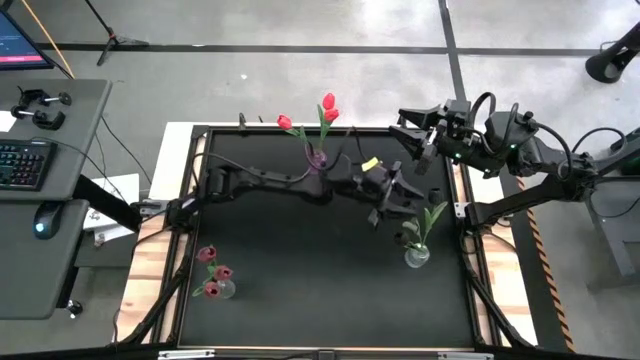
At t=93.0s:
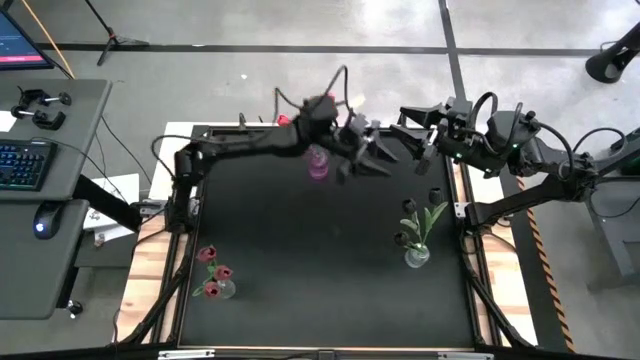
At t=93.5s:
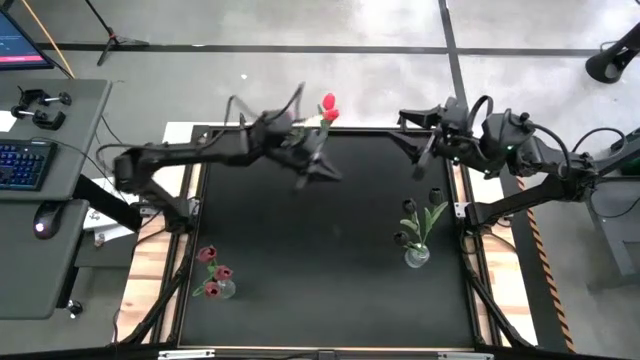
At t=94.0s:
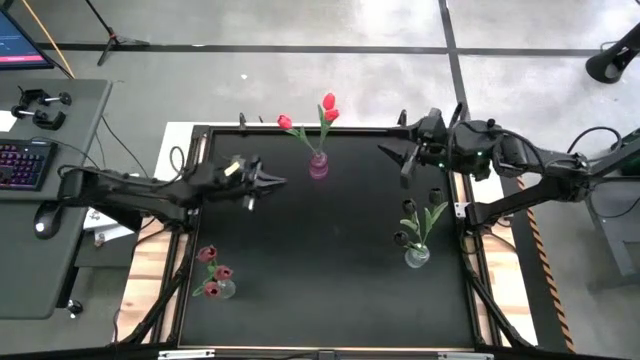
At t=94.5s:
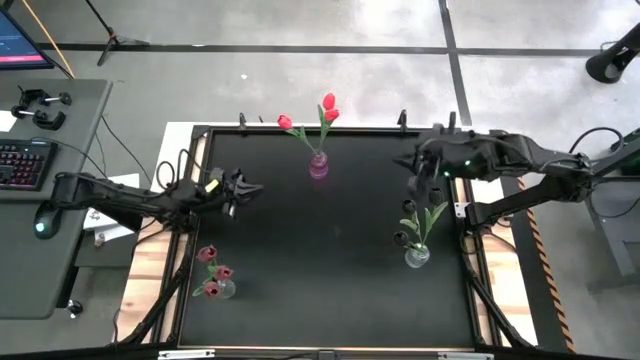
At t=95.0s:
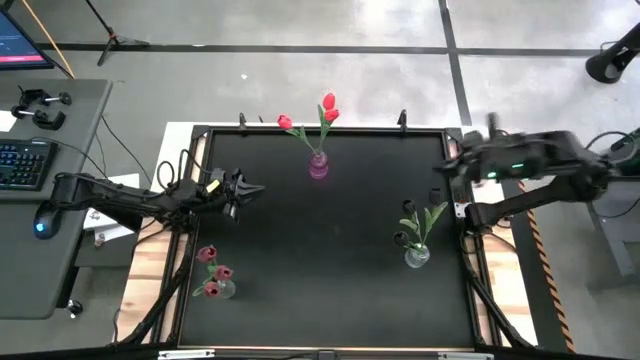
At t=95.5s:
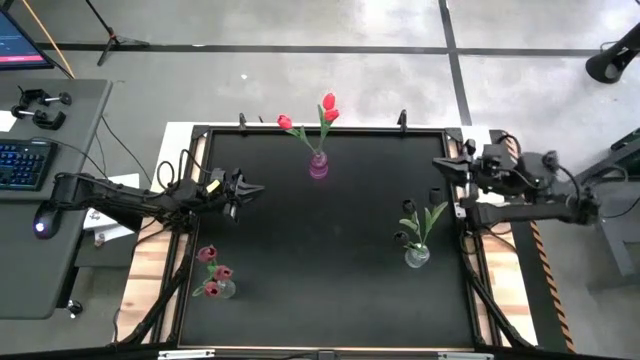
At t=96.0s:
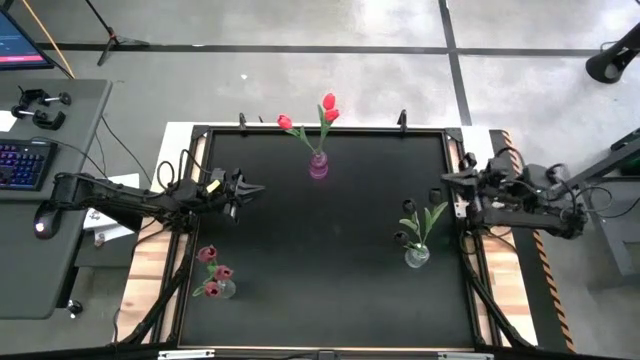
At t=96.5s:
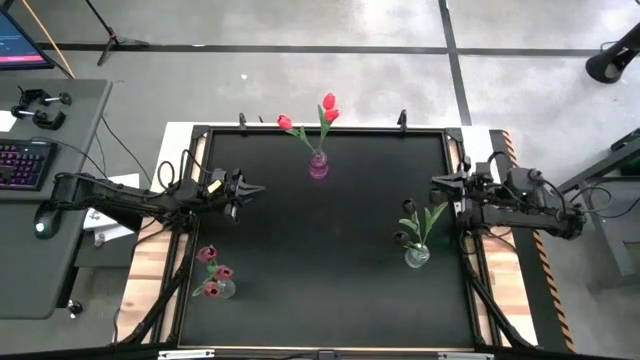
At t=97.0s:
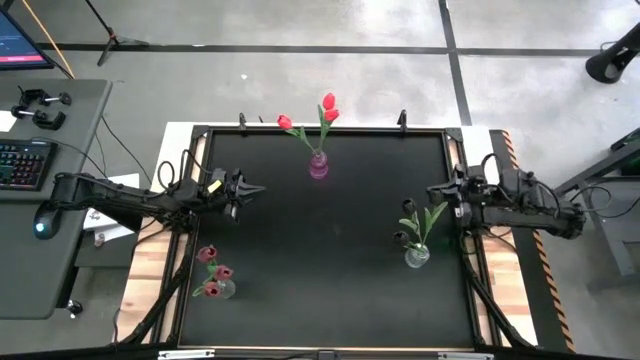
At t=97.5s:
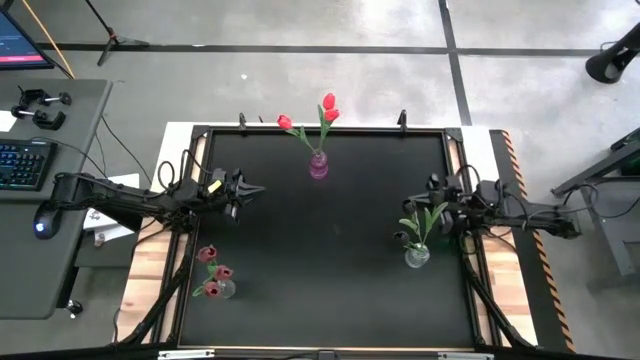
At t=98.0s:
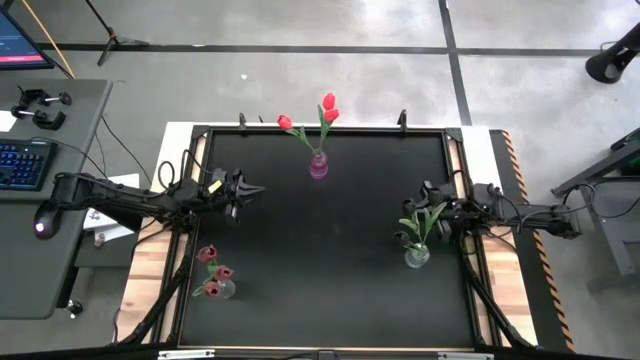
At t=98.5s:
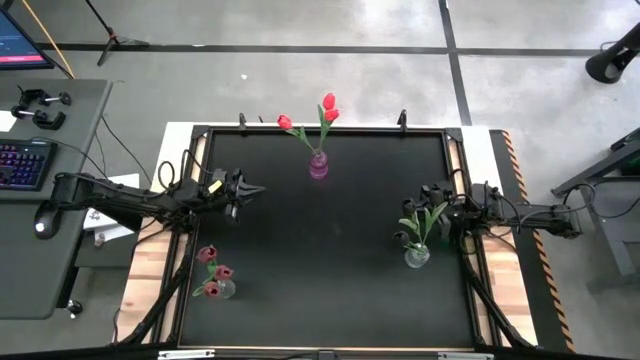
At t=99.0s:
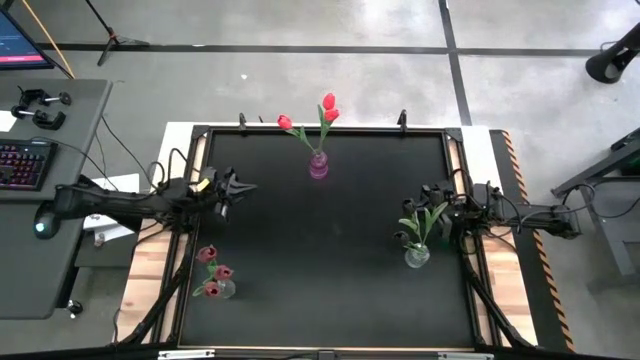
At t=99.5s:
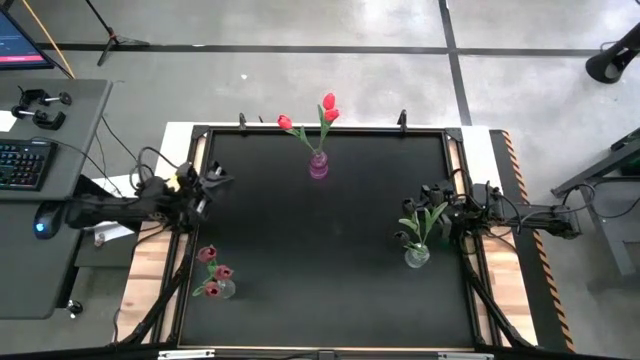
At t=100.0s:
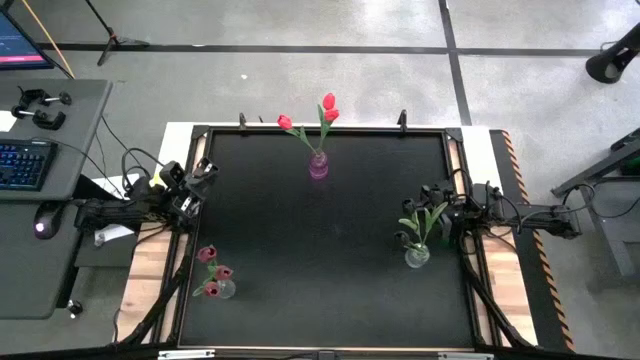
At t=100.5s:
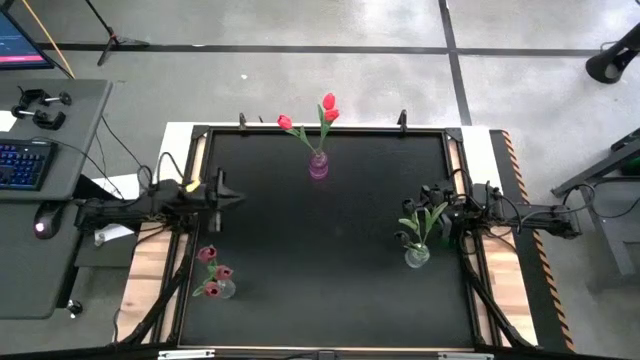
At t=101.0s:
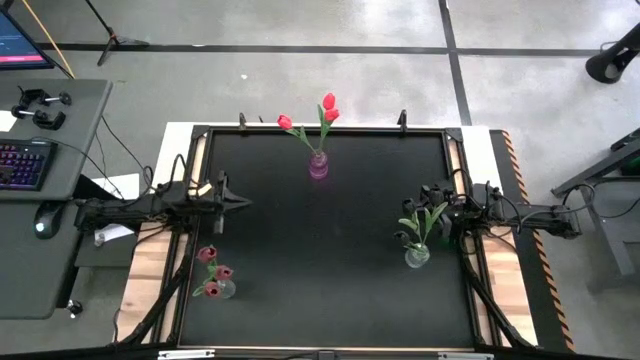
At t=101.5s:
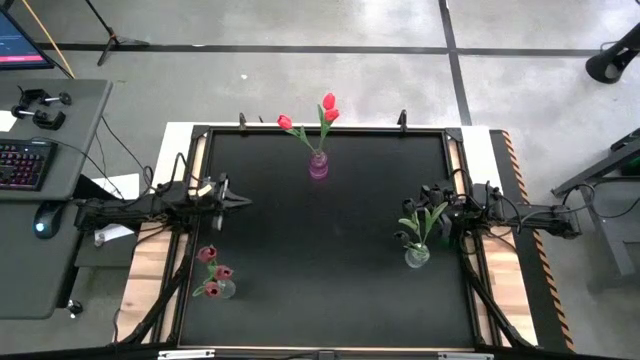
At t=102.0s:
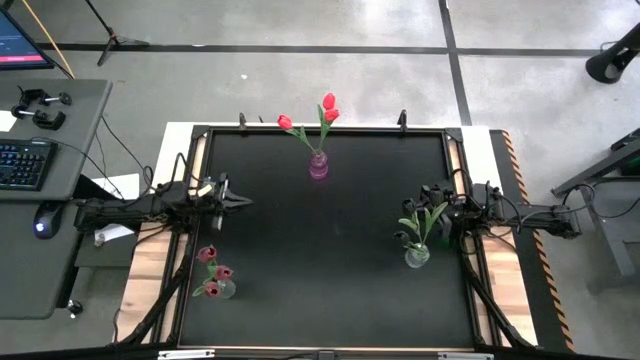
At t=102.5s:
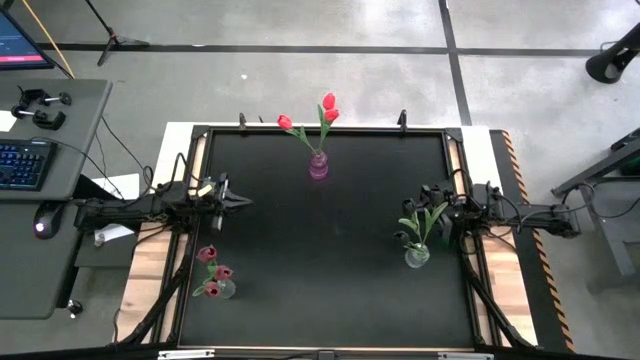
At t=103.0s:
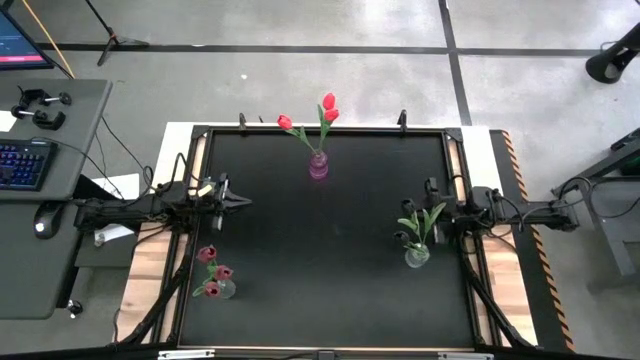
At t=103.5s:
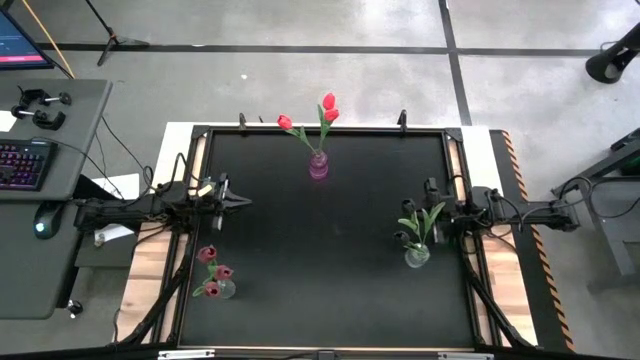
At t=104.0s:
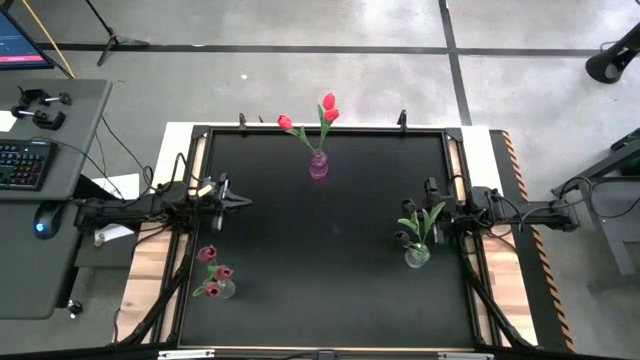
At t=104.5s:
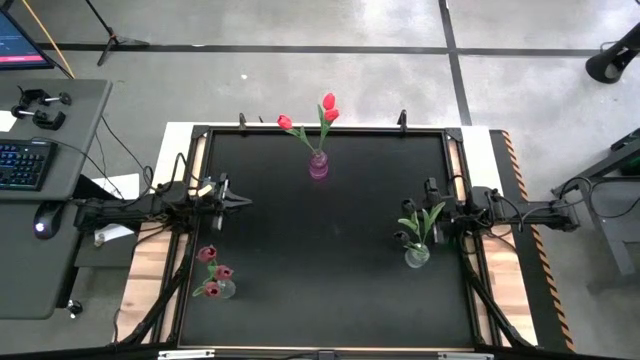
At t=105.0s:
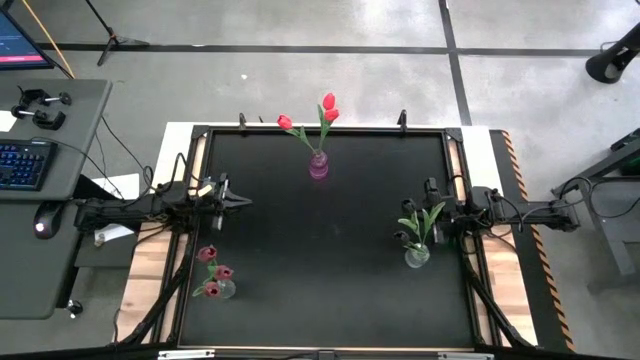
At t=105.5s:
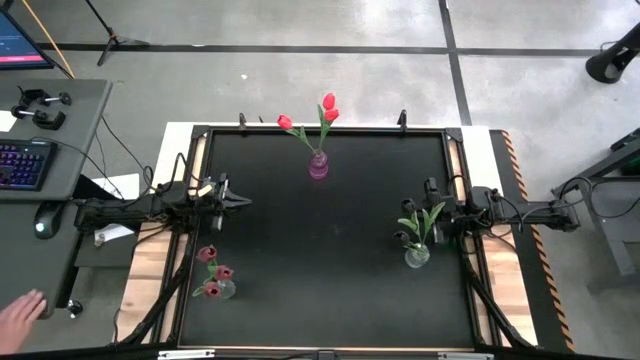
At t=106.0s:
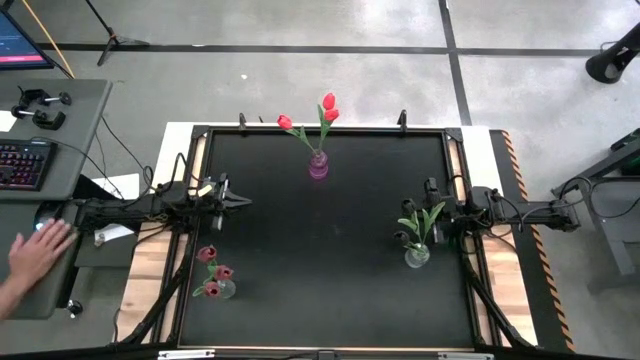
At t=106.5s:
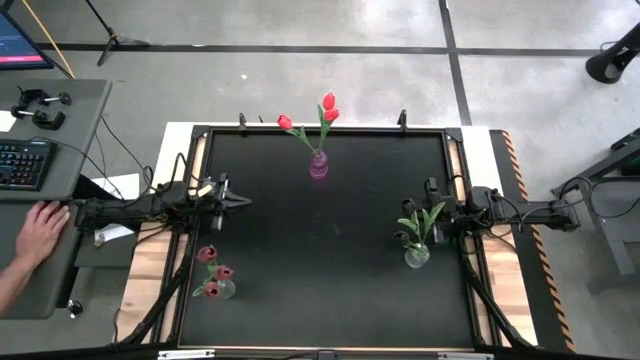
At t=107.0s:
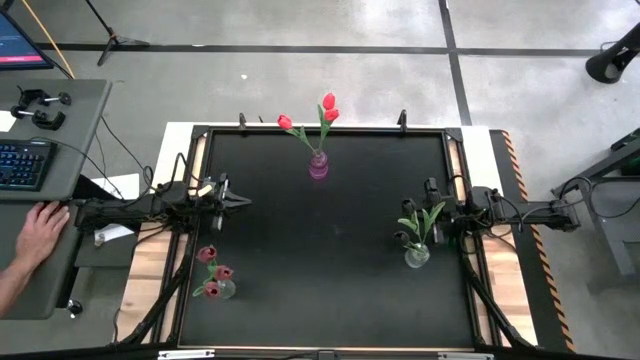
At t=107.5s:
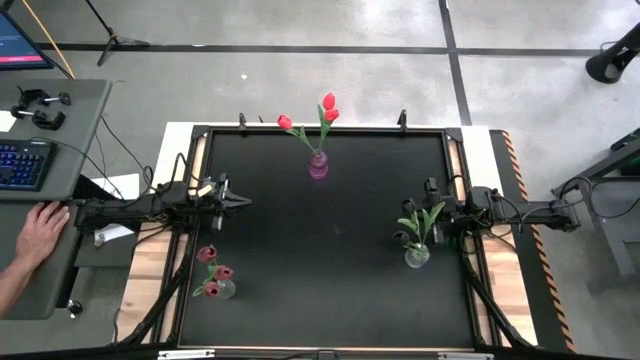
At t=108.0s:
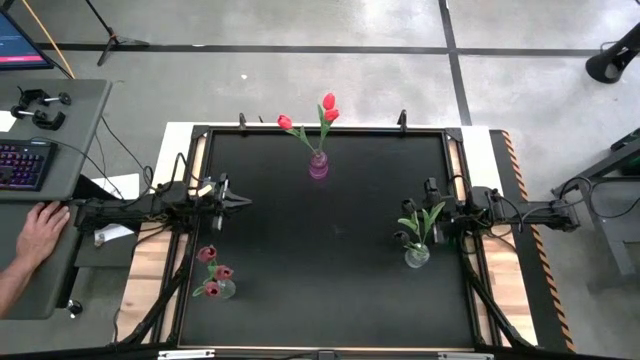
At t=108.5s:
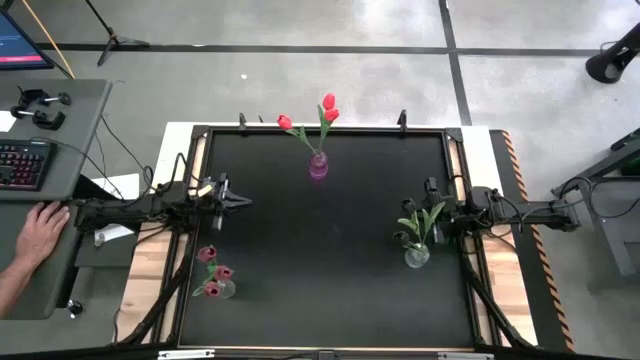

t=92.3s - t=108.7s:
Task: Sort flowers into vase by color
Return to Home Position

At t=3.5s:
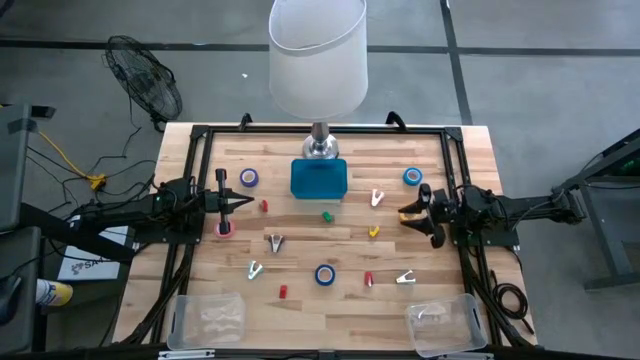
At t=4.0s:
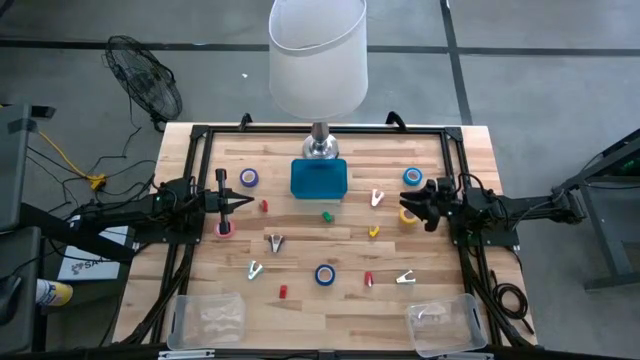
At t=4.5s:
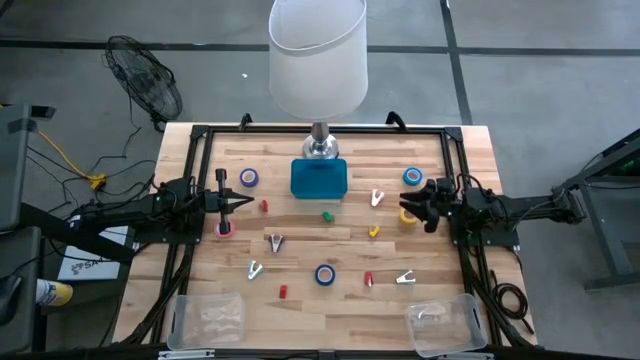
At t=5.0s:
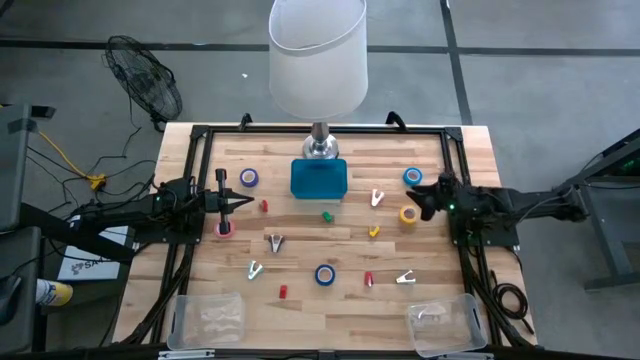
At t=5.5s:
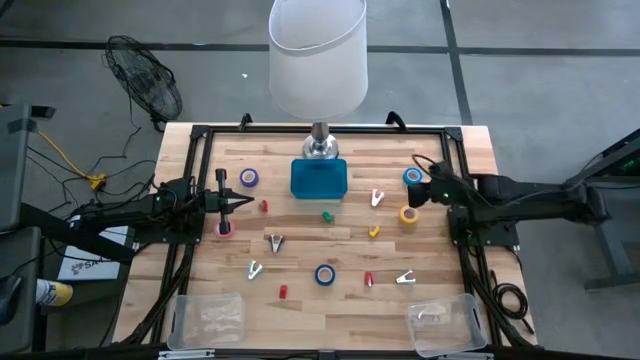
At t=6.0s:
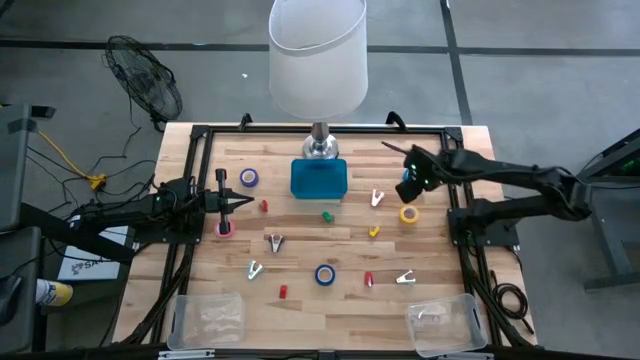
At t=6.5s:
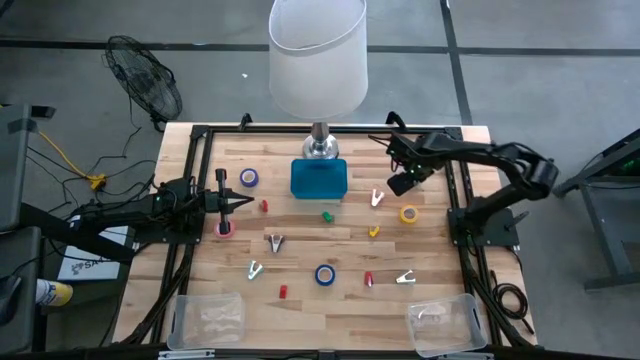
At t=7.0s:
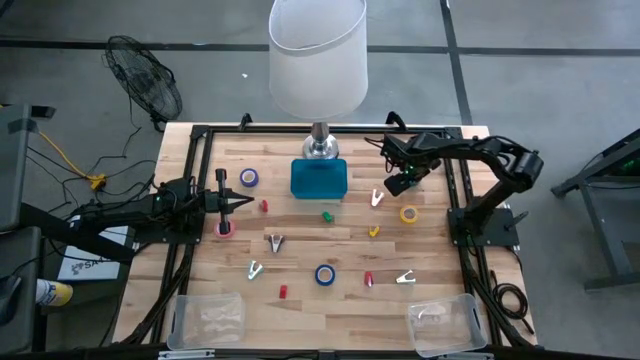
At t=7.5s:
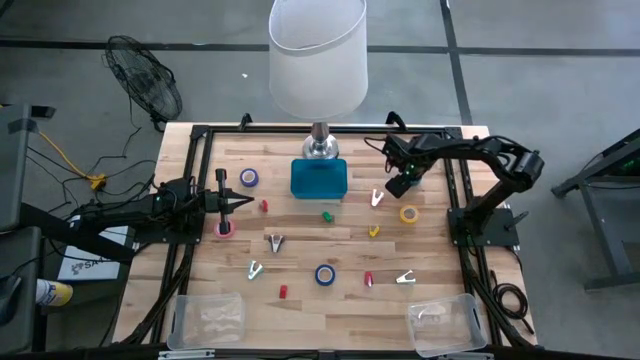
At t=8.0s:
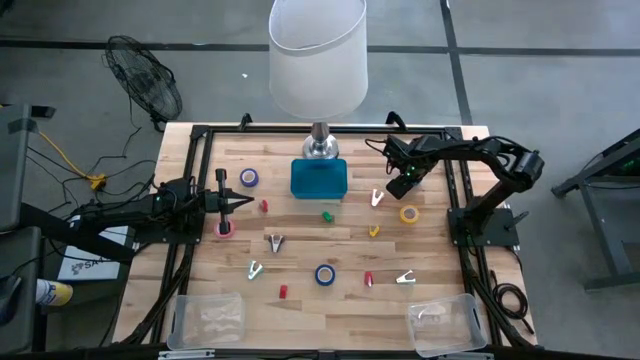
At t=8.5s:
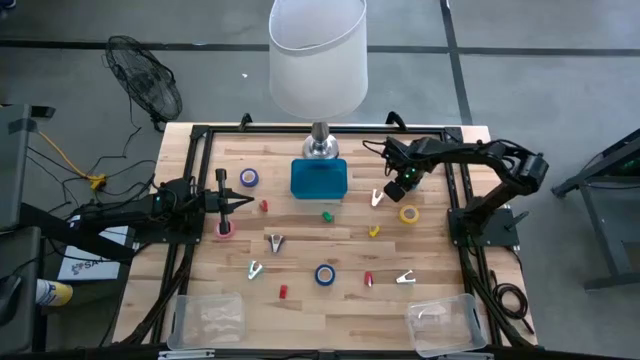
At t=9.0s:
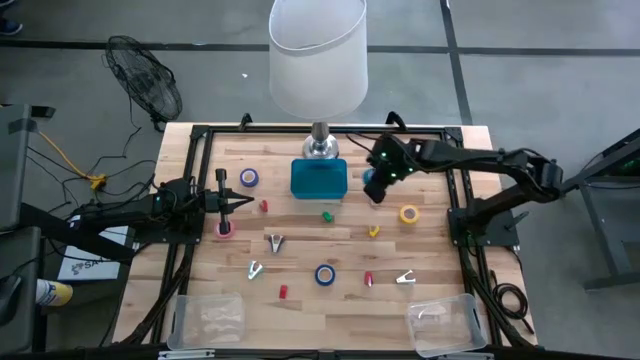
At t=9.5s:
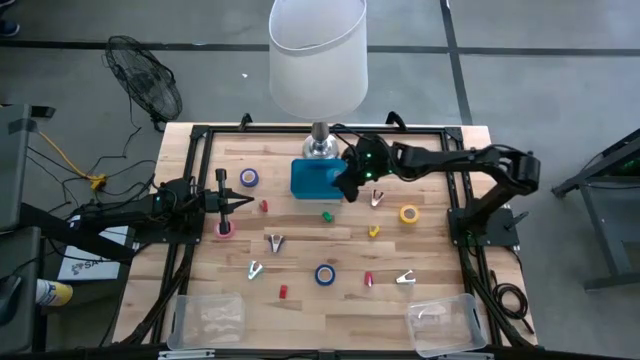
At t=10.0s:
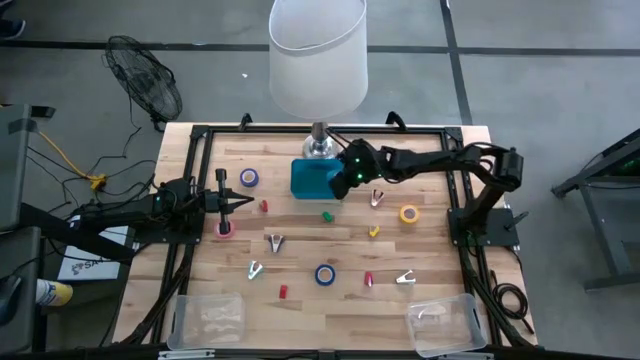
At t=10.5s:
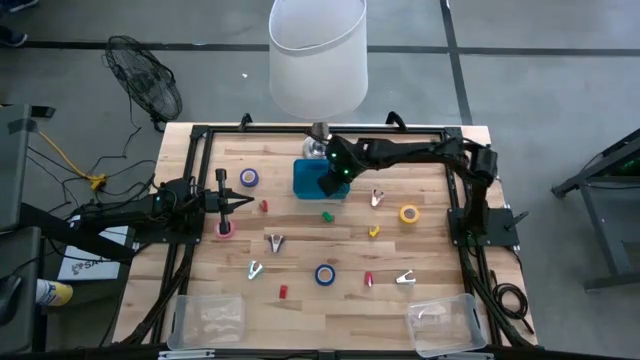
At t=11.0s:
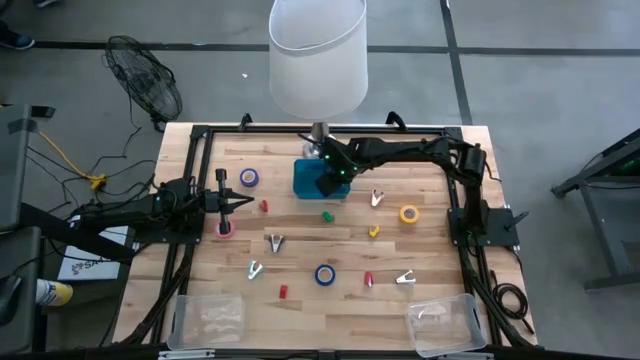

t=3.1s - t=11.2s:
Task: Pick and place Stapler, Stapler remover, tape
Put the light blue tape into the blue bin
